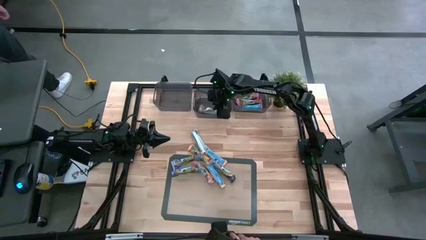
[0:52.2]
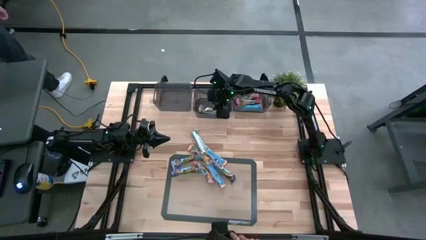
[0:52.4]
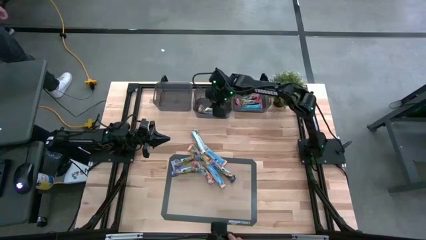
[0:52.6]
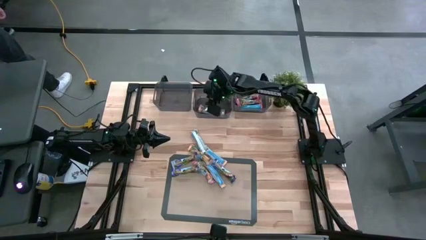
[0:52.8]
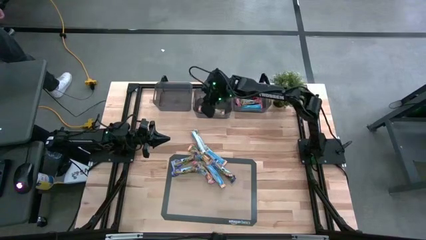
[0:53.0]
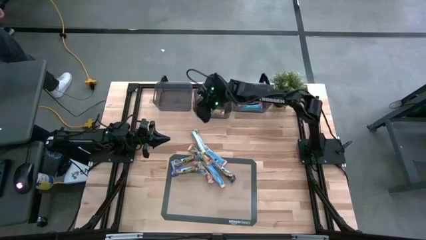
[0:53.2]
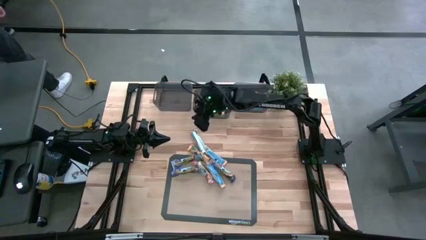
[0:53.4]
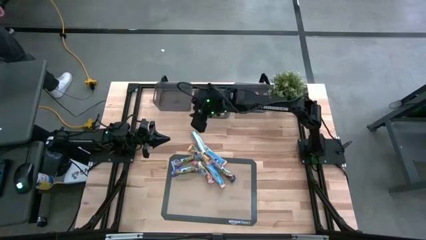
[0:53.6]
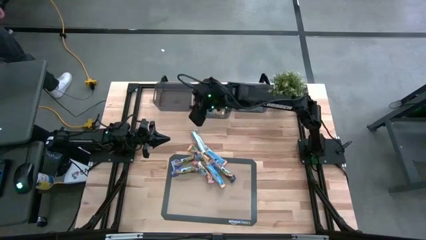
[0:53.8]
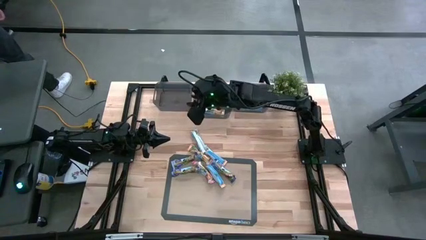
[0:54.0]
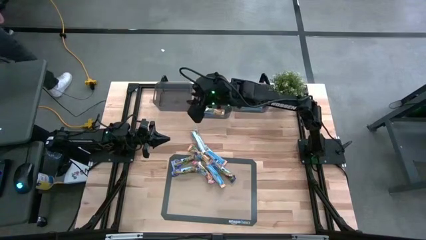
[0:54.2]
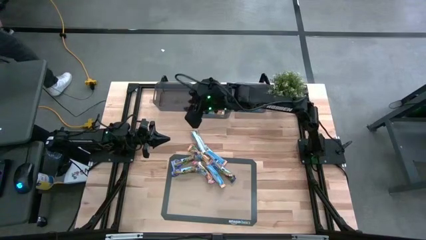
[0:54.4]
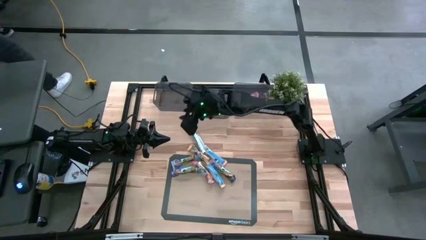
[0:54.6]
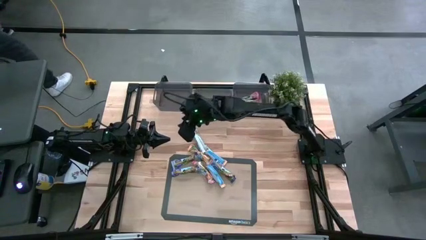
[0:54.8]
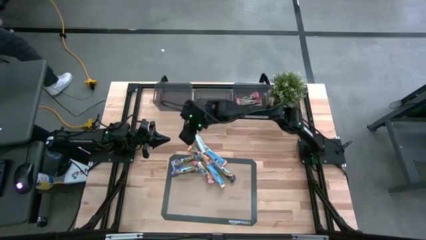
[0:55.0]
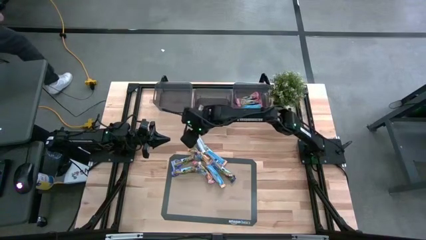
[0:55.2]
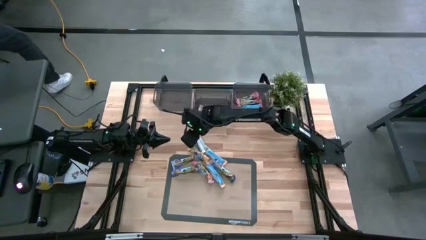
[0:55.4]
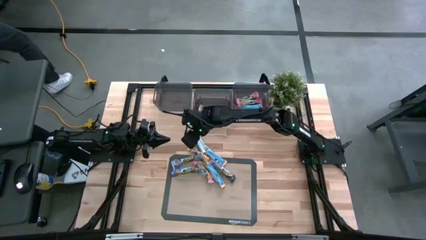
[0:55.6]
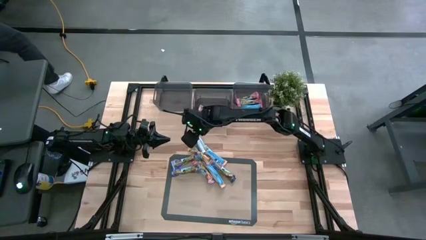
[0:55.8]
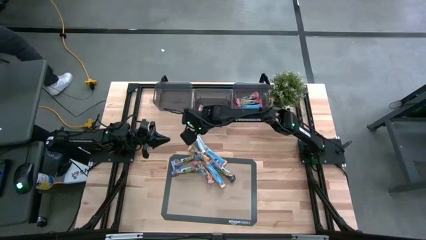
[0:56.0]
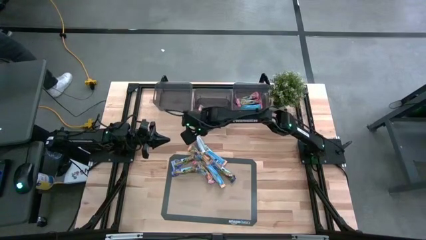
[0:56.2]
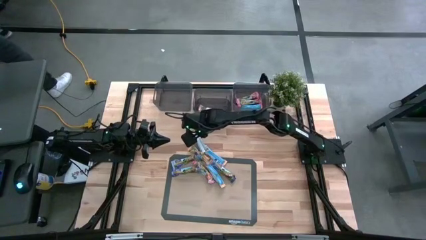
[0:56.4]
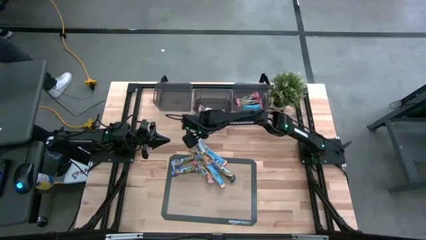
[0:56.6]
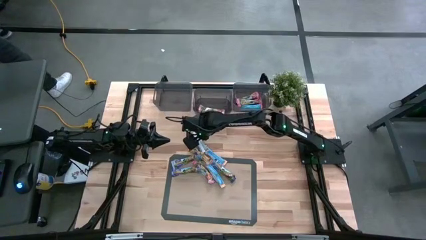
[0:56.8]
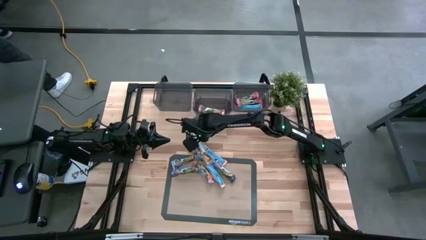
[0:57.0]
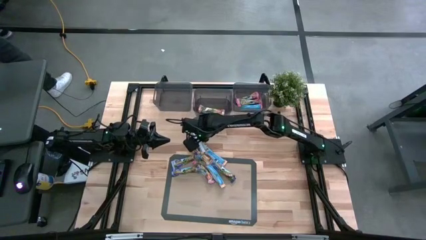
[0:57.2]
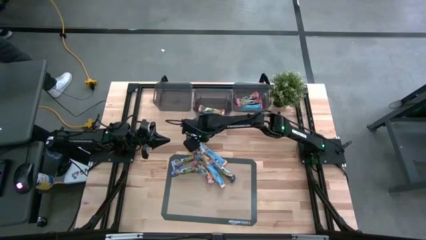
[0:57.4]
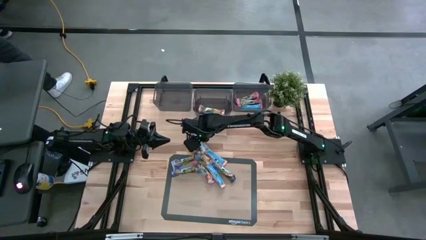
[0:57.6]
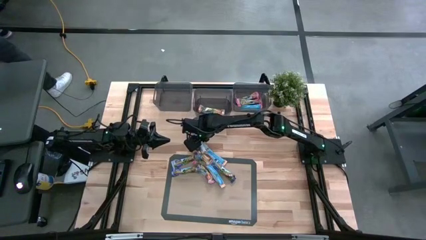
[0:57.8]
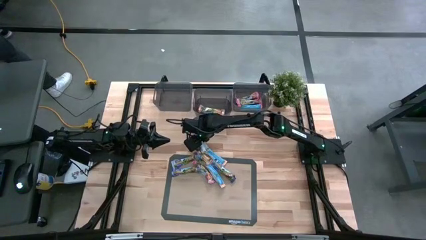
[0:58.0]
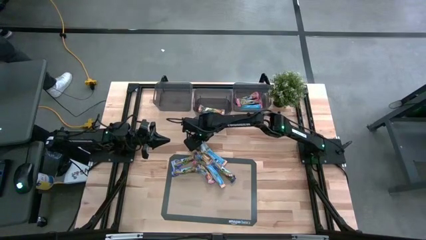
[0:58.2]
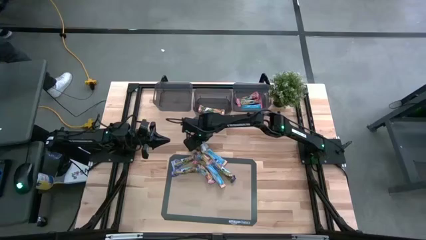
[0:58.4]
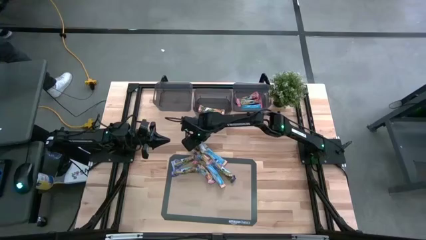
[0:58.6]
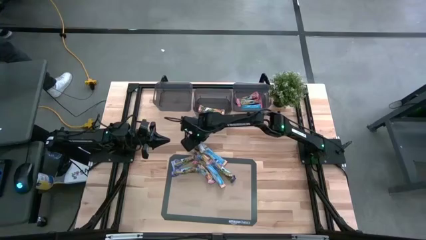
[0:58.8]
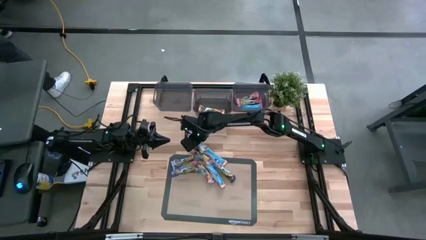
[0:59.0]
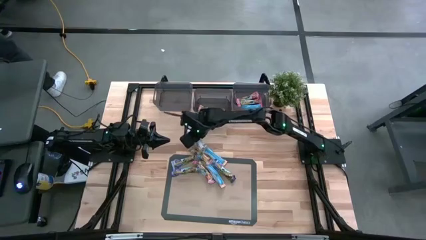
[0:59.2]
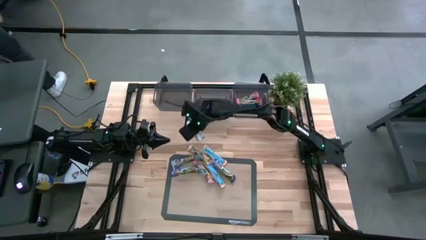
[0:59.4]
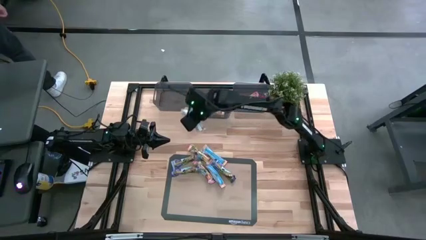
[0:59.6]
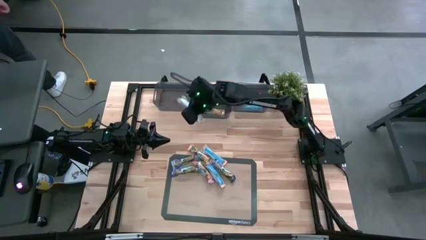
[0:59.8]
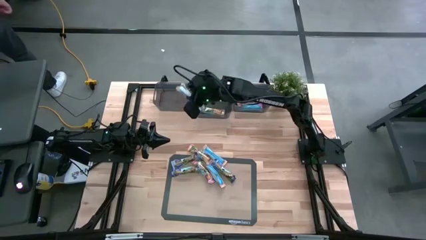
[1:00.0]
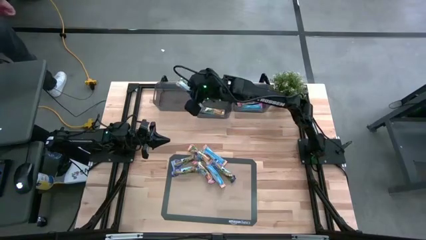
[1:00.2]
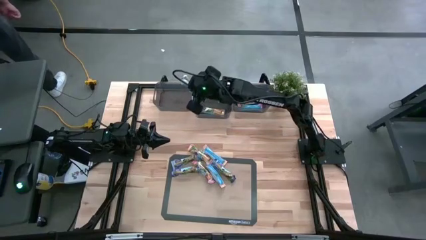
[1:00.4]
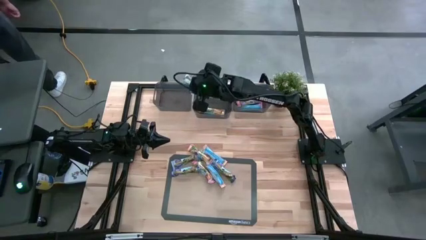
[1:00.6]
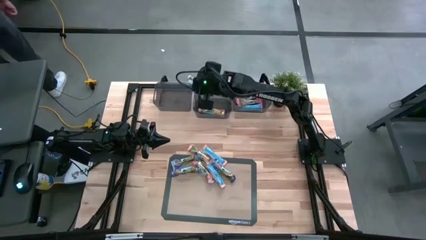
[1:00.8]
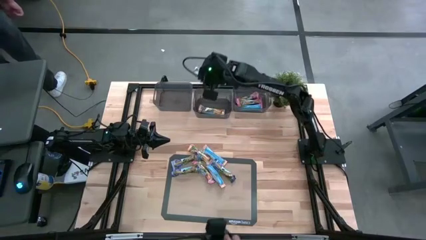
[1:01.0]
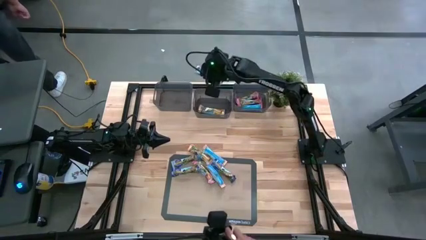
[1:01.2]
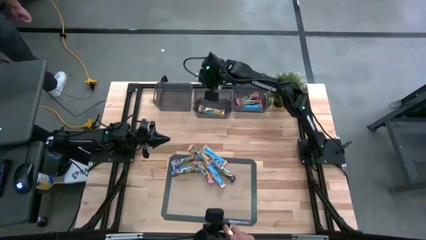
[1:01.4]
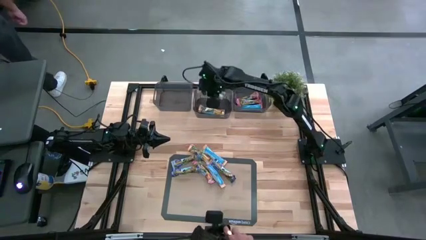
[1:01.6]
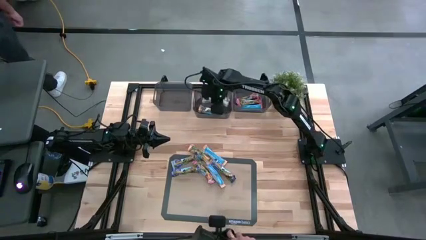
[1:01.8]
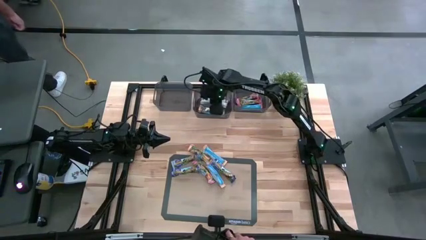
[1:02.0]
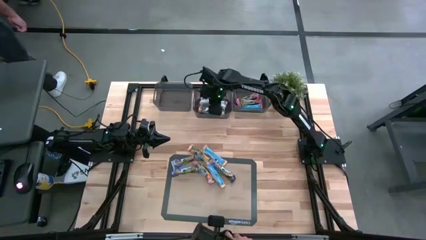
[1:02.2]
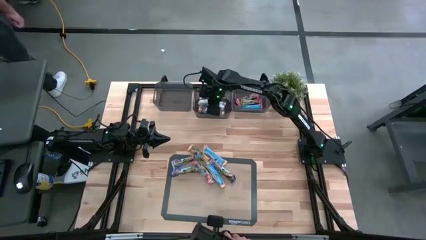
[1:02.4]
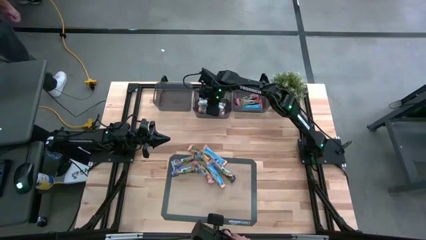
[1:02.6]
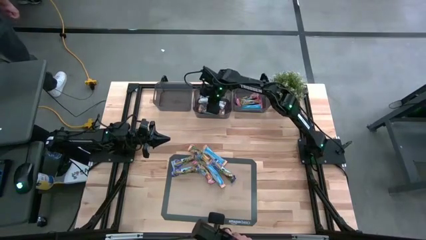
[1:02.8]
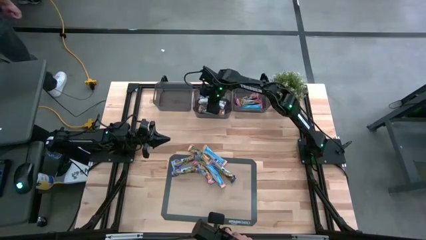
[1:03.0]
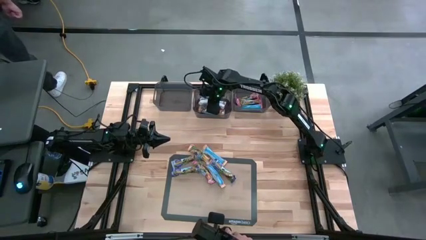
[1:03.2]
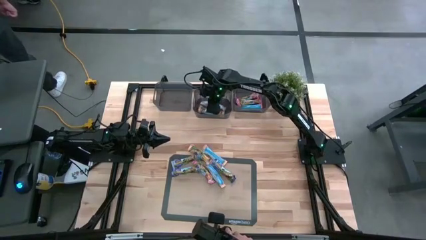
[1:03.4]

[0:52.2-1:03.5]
Task: Pick and place Granola Bars by type
Put the yellow granola bar into the center black bin

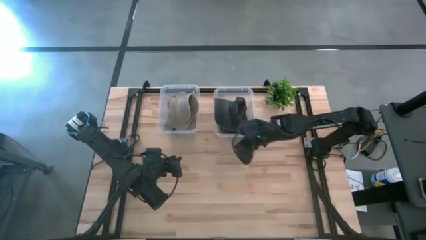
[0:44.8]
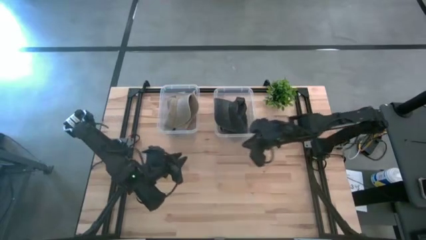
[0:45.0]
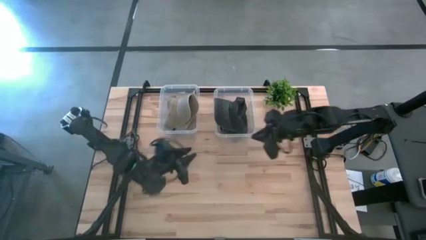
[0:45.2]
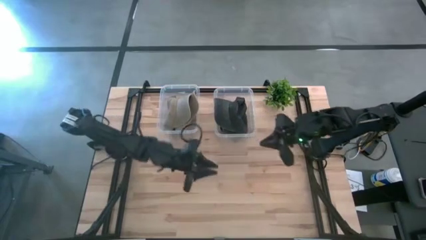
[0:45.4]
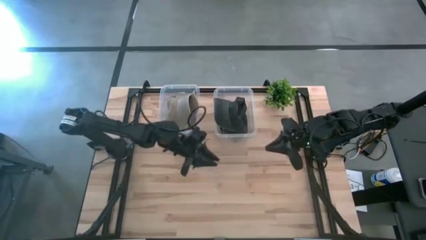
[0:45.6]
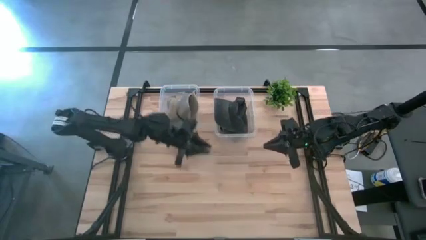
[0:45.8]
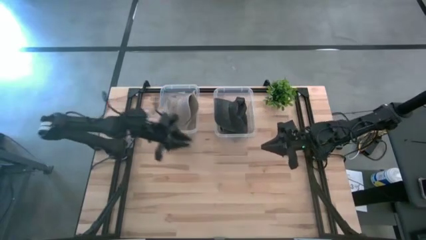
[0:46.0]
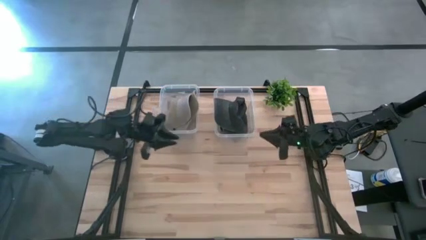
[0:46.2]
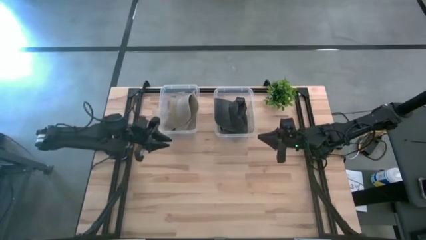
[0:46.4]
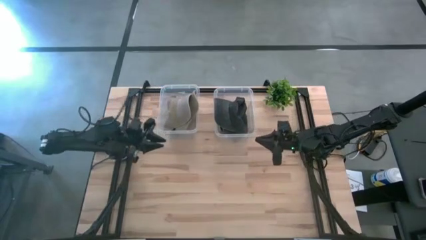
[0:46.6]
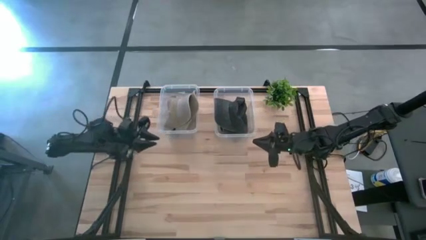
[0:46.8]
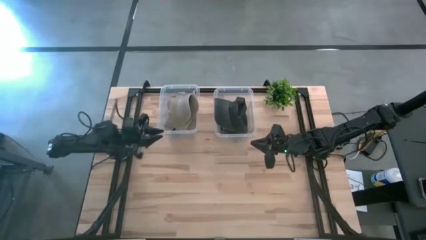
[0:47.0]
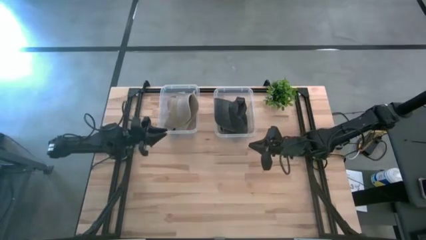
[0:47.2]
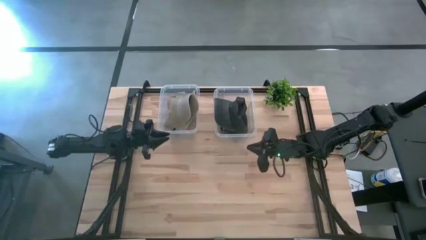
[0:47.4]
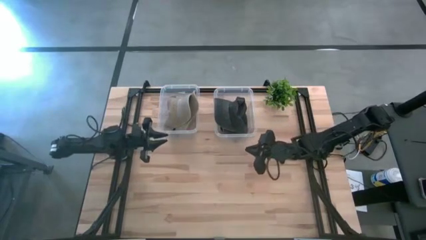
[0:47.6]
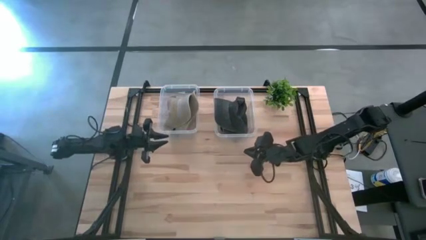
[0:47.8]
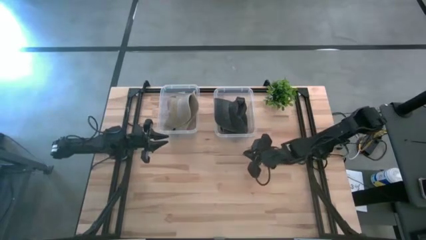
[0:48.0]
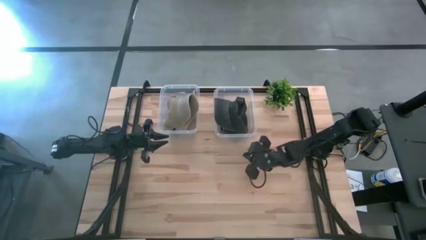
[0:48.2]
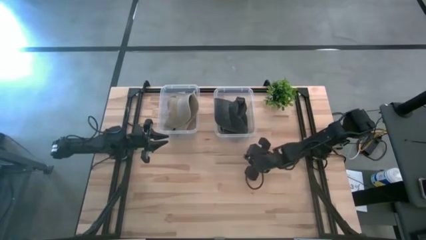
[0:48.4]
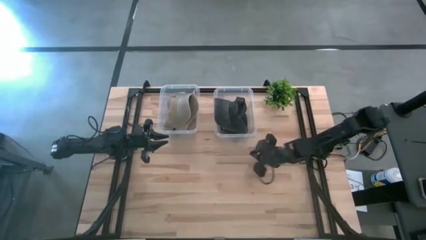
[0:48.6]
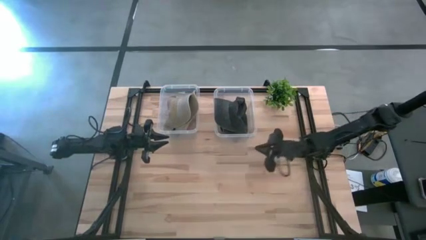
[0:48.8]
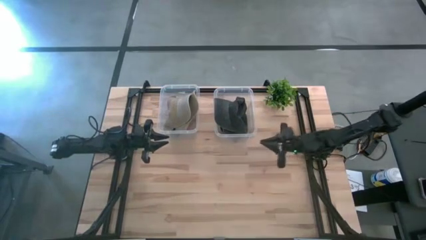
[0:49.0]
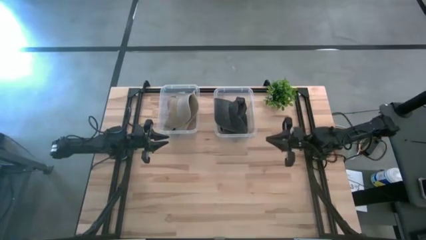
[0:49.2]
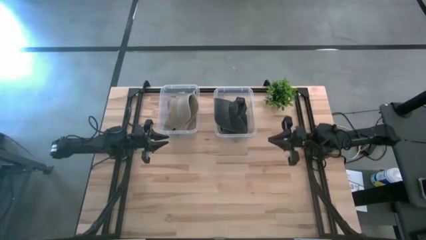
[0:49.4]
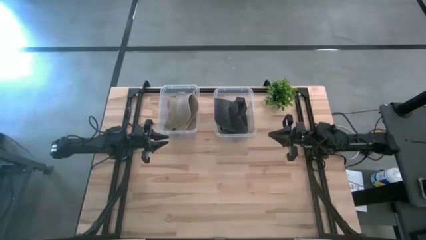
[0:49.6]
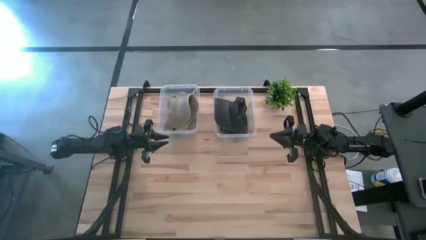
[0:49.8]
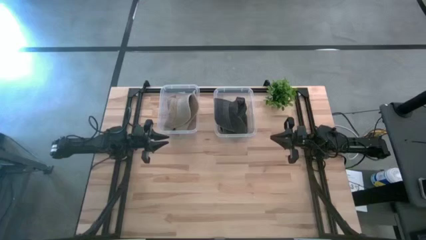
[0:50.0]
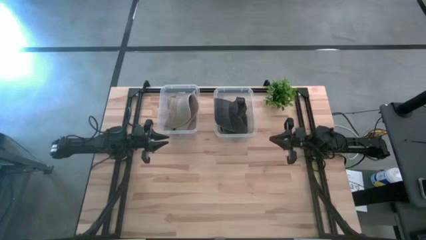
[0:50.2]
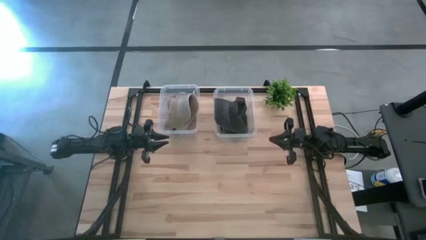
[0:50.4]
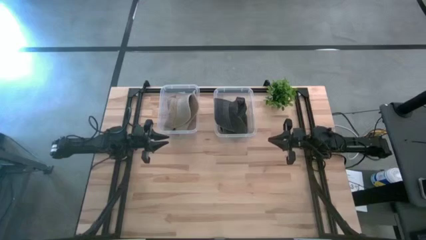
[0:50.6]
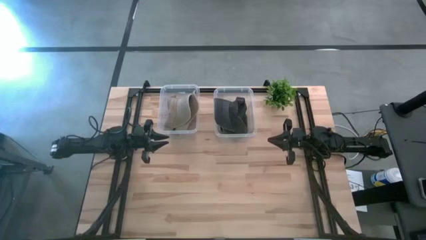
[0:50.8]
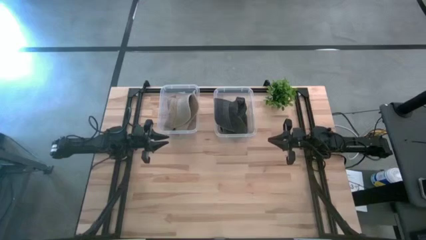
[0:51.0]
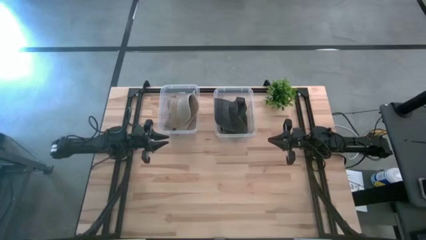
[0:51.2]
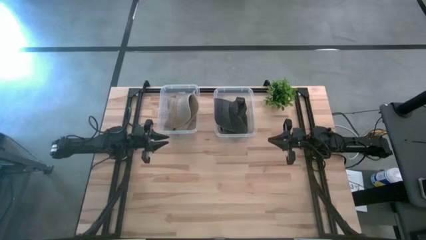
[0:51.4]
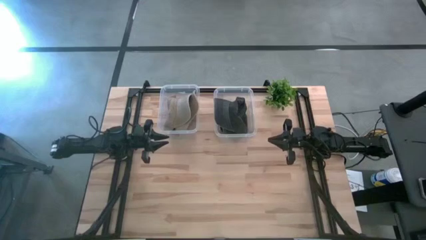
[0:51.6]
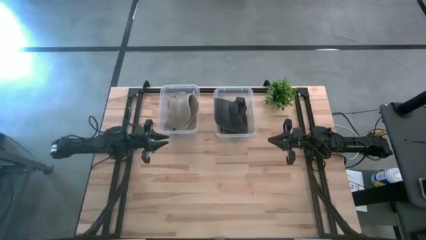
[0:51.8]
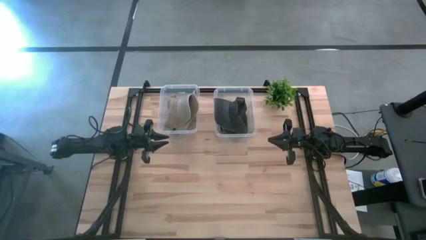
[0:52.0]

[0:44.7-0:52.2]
Task: Pick & Place hat
Return To Home Position
